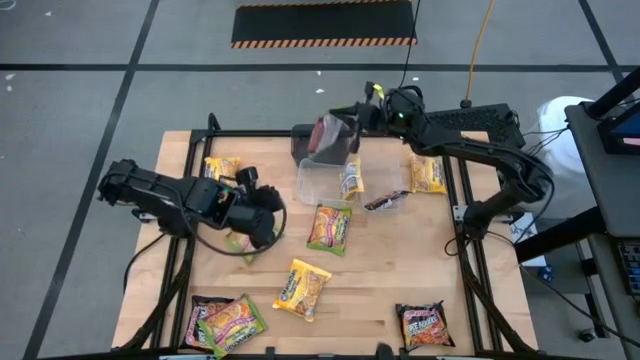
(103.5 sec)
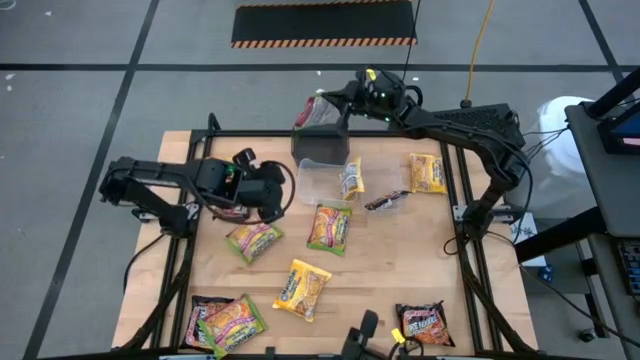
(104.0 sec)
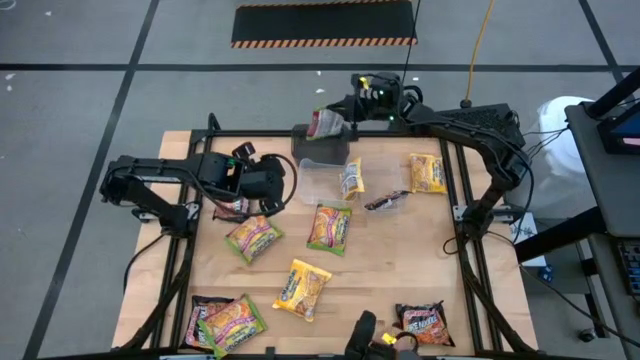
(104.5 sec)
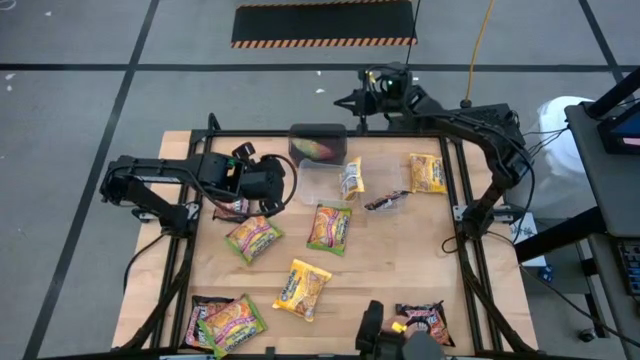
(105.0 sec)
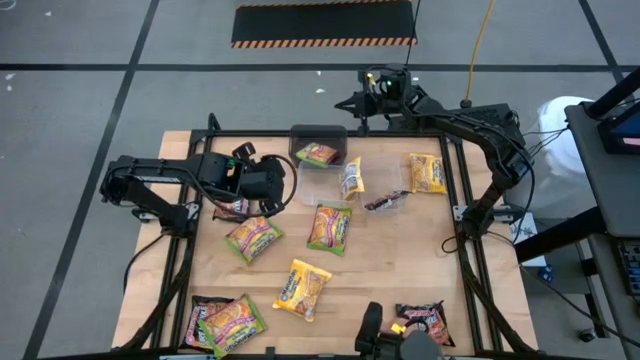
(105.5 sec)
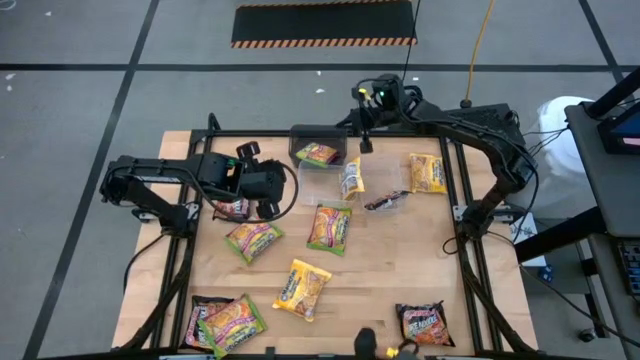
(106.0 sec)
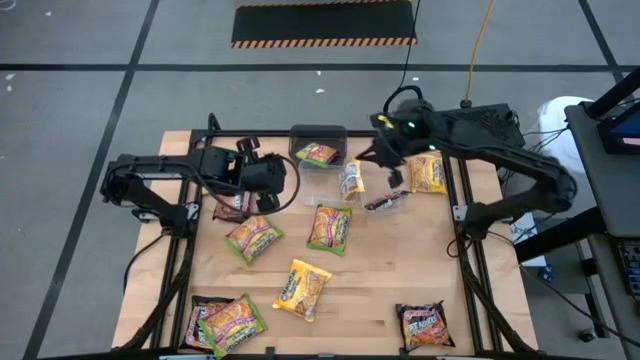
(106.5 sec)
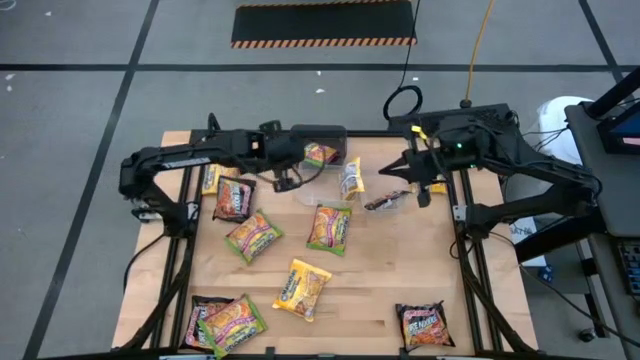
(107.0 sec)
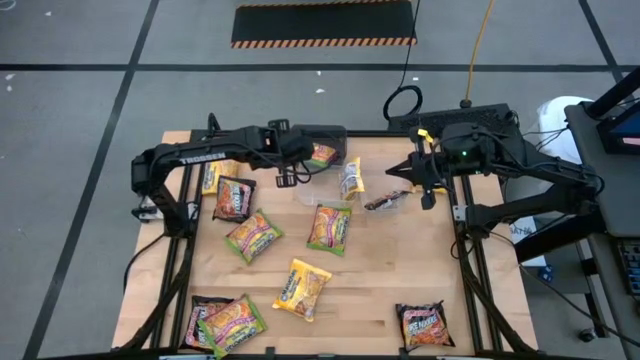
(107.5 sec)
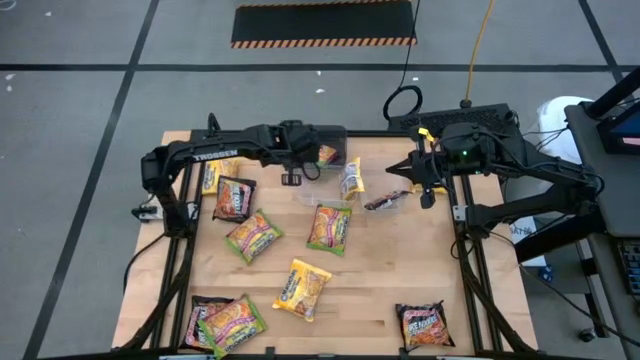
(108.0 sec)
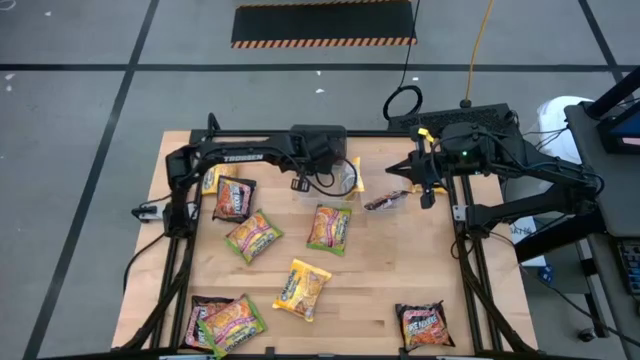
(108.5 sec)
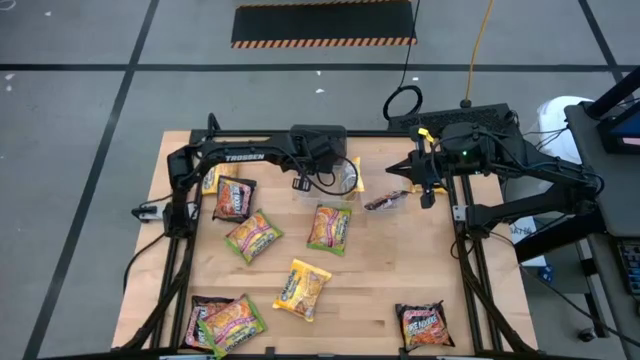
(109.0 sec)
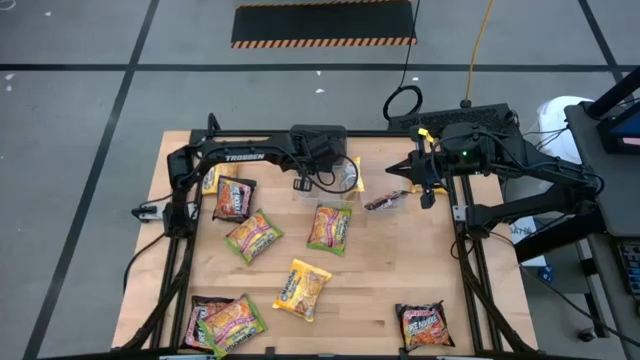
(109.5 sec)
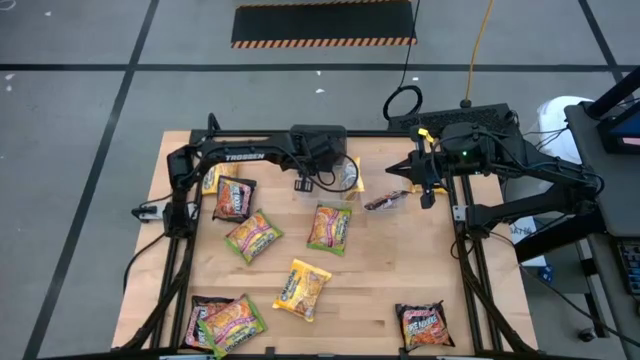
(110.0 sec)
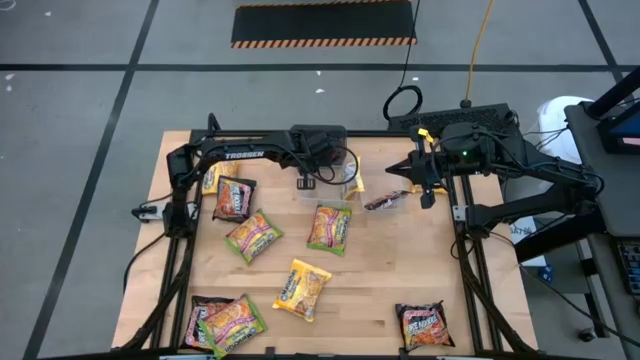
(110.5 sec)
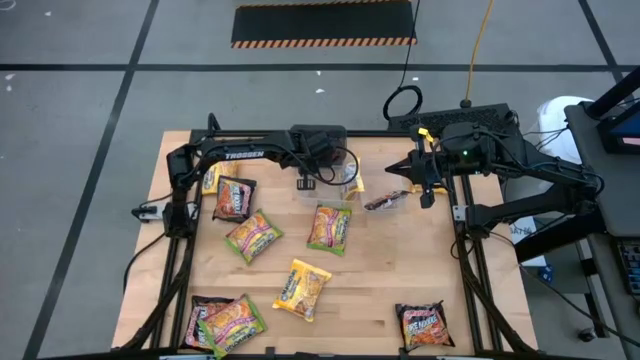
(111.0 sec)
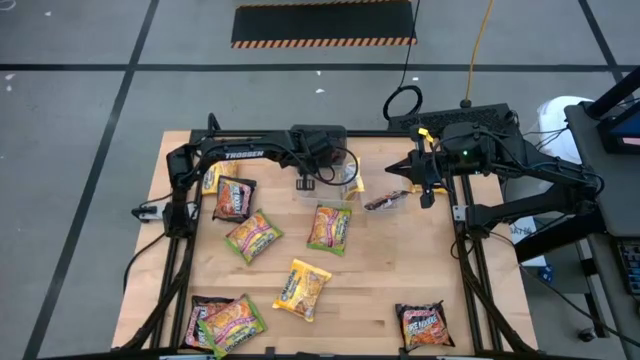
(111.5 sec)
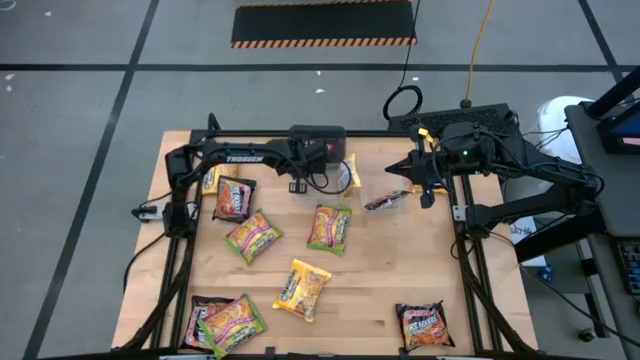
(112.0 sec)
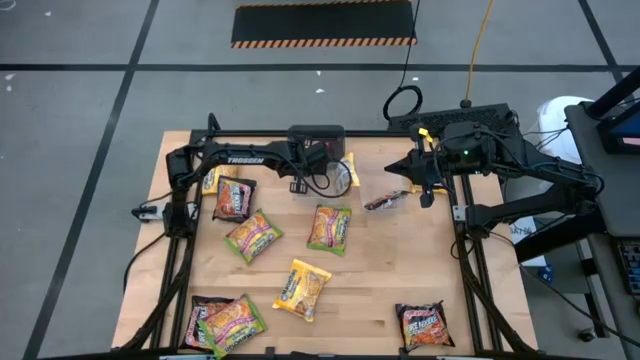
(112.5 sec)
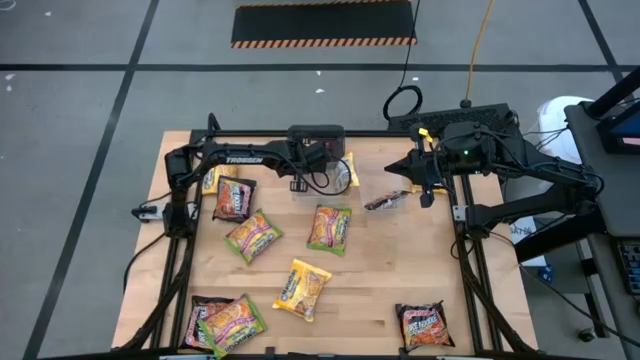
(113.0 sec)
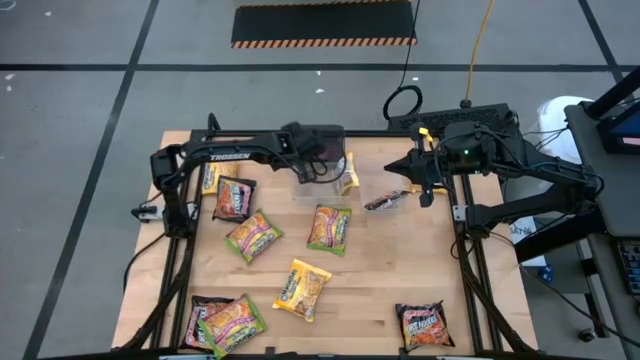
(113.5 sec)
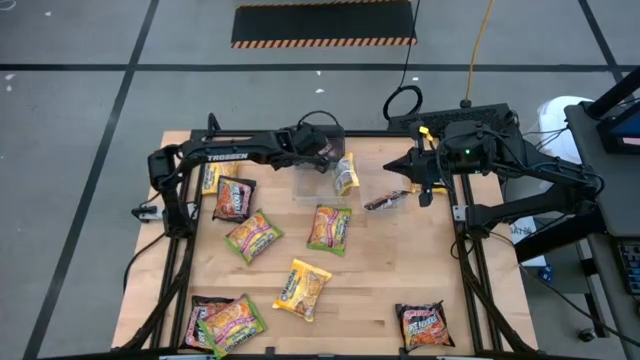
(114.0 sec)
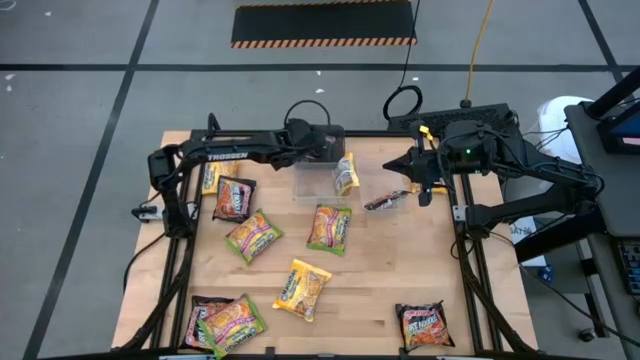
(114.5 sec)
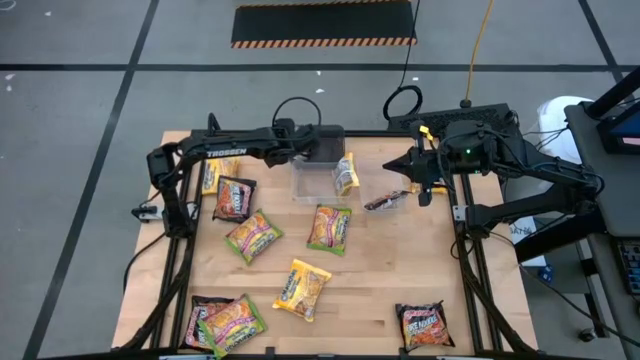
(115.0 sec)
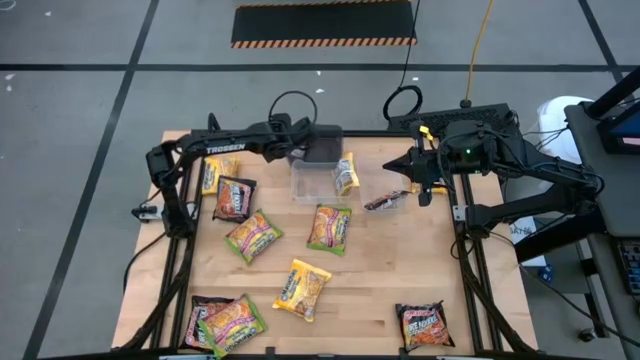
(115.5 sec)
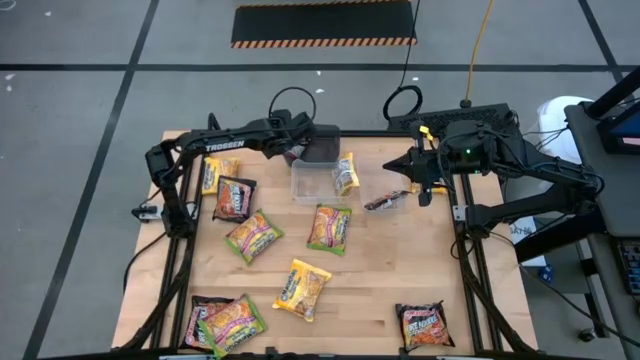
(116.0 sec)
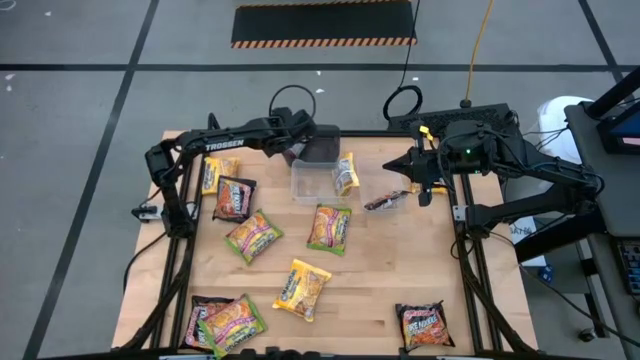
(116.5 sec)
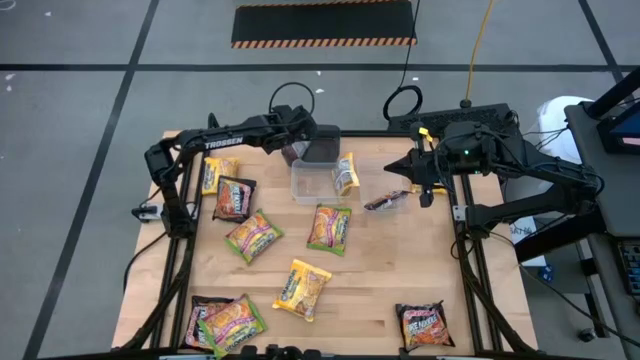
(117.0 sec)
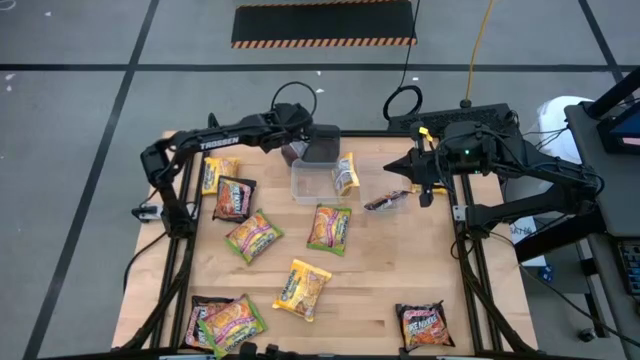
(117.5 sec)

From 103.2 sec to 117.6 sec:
Task: Sort Maruchan noodles
Put the green noodle pack into the black bin

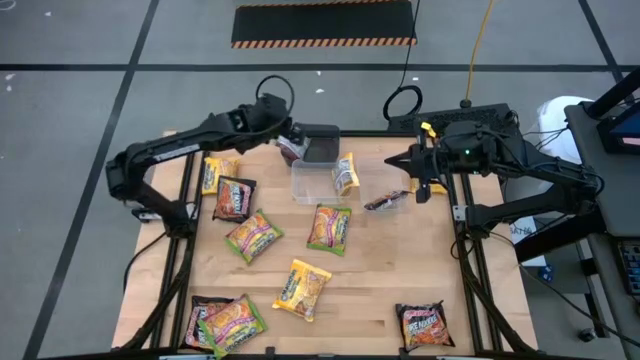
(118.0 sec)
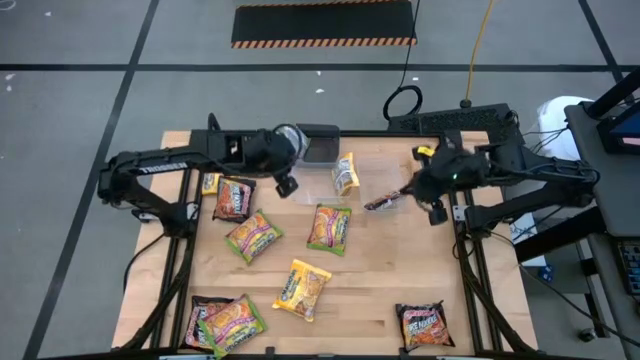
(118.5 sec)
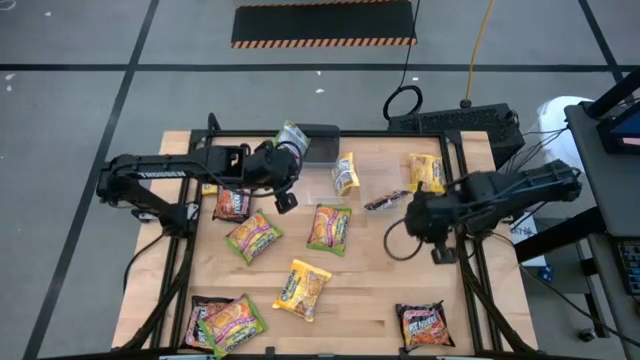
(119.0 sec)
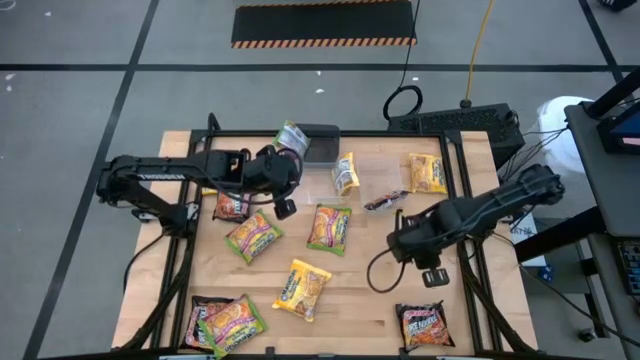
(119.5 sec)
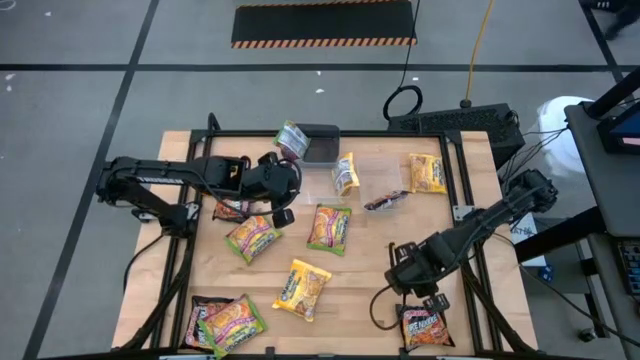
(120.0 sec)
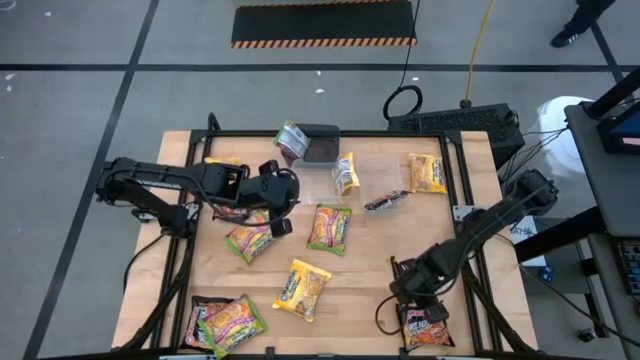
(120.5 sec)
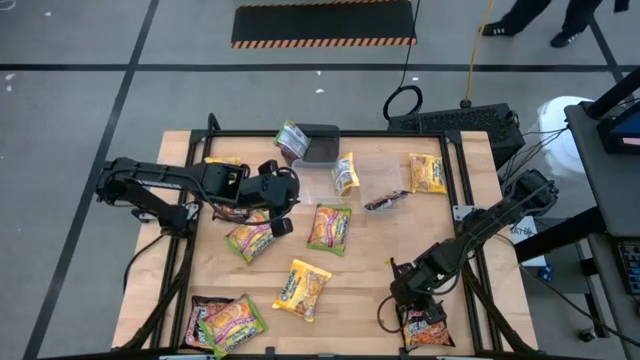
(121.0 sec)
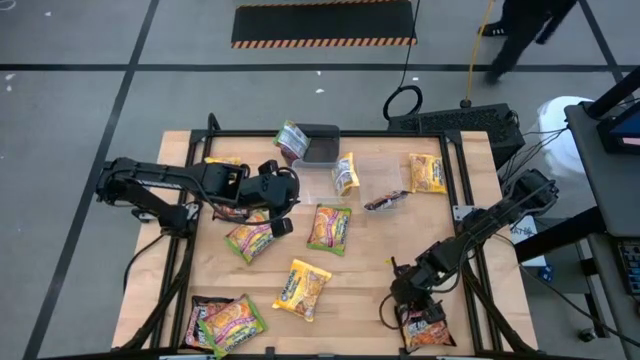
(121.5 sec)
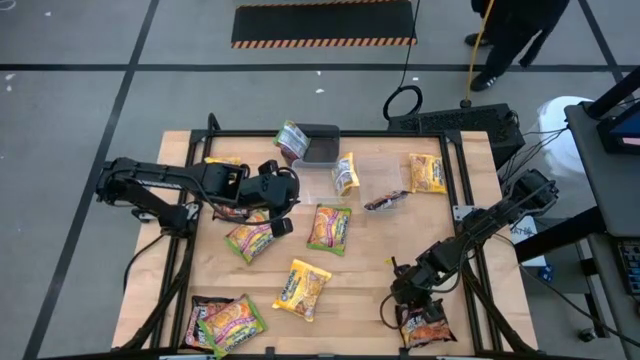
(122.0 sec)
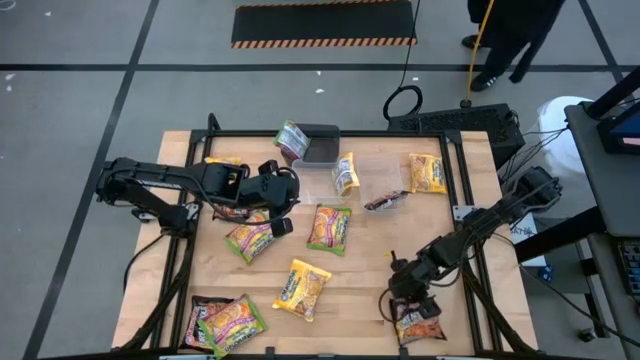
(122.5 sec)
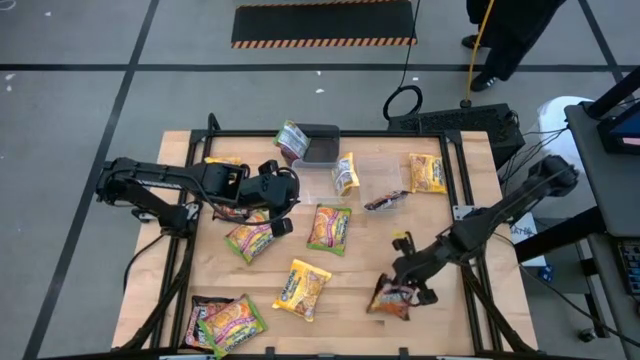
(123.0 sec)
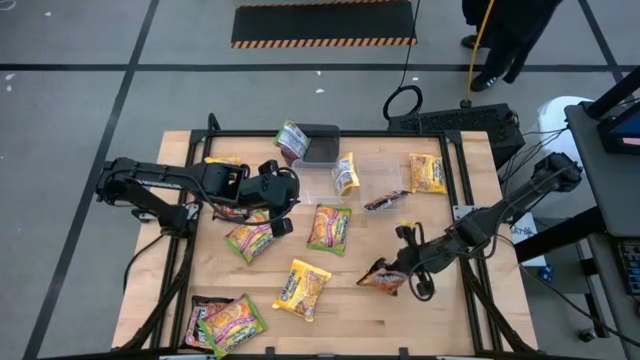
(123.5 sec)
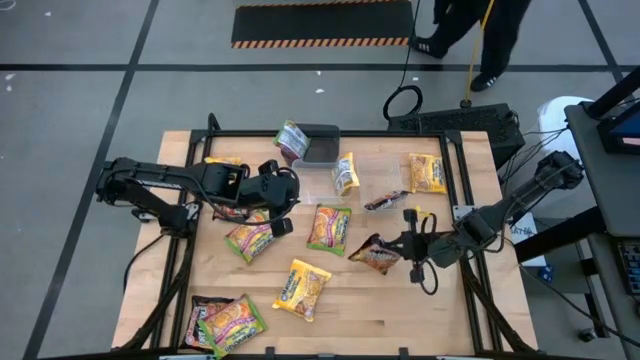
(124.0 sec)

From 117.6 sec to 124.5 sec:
Put the black noodle pack into the right transparent bin
